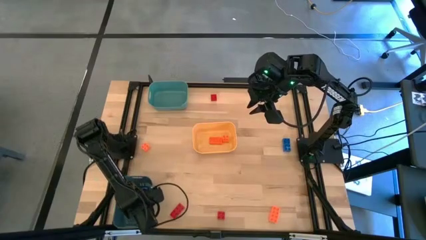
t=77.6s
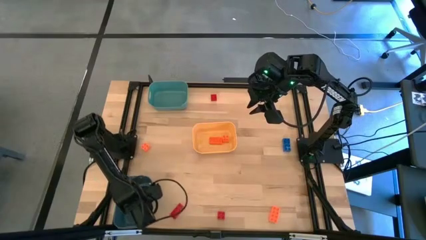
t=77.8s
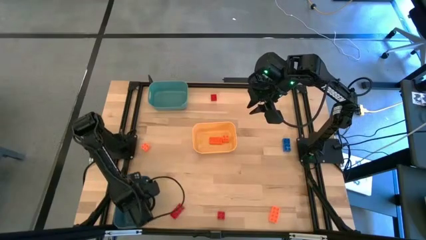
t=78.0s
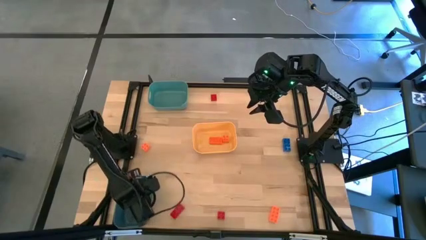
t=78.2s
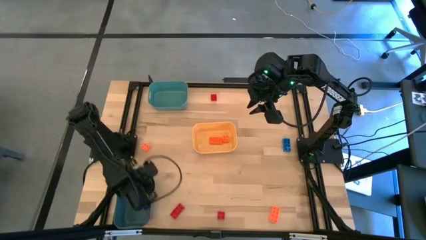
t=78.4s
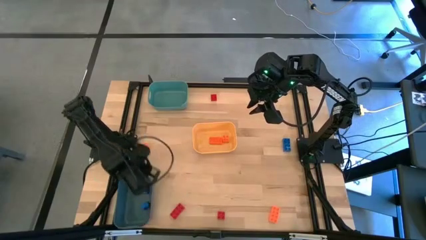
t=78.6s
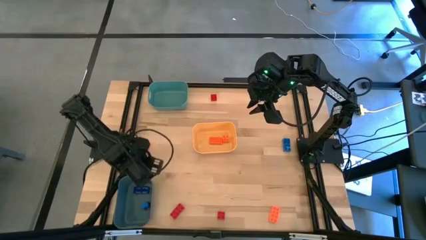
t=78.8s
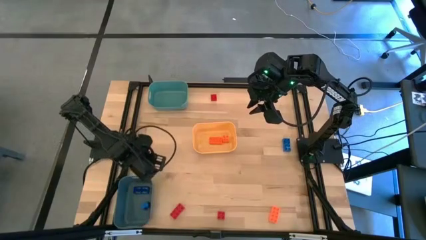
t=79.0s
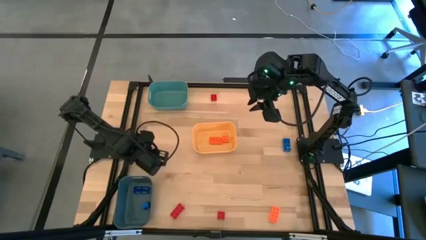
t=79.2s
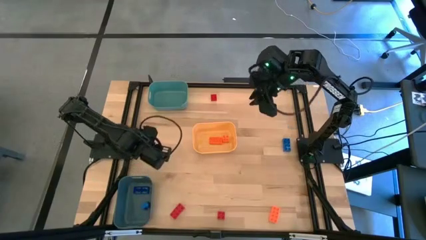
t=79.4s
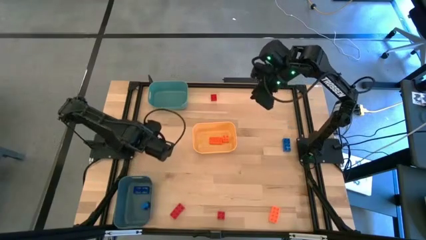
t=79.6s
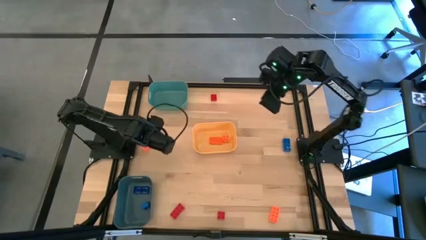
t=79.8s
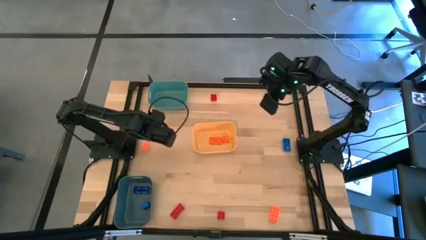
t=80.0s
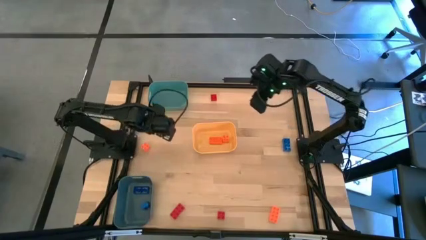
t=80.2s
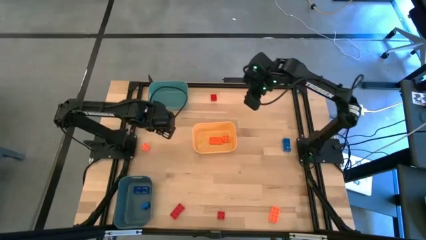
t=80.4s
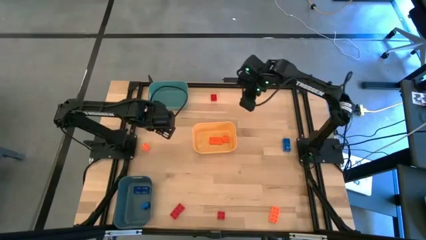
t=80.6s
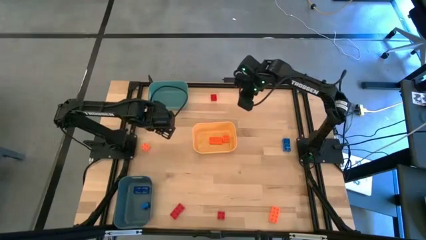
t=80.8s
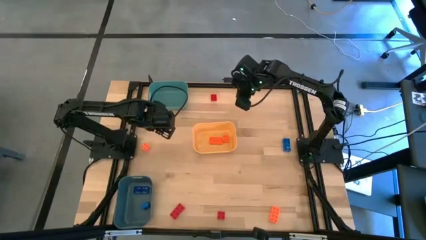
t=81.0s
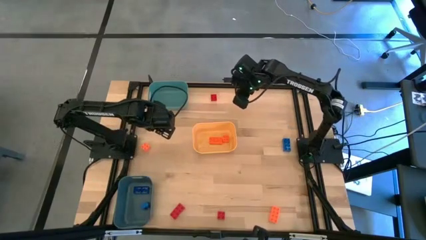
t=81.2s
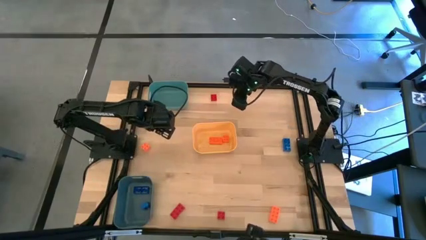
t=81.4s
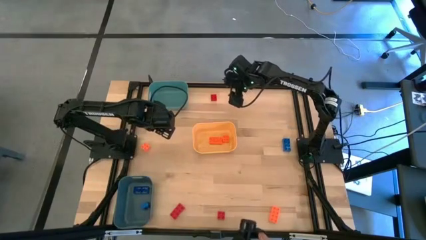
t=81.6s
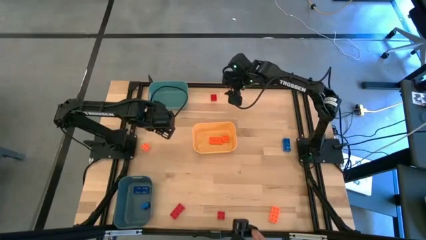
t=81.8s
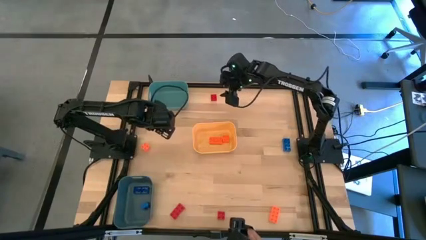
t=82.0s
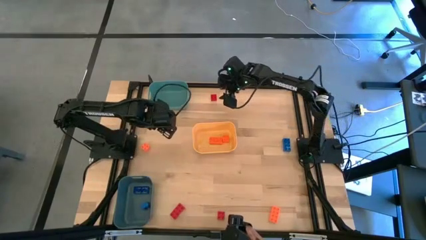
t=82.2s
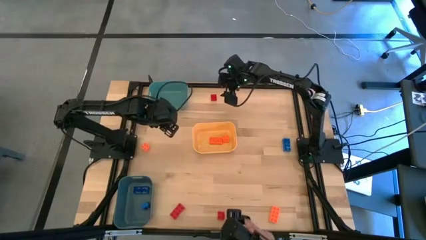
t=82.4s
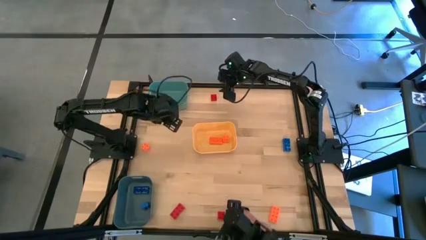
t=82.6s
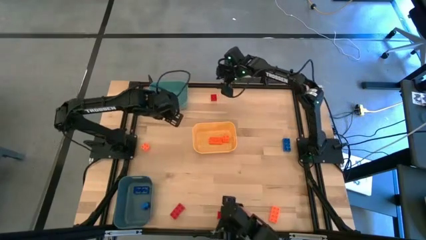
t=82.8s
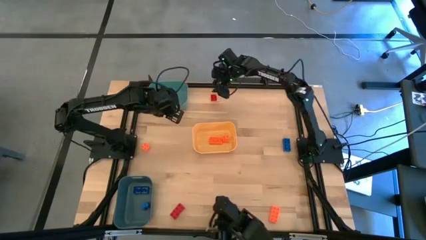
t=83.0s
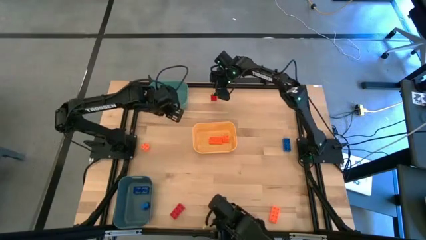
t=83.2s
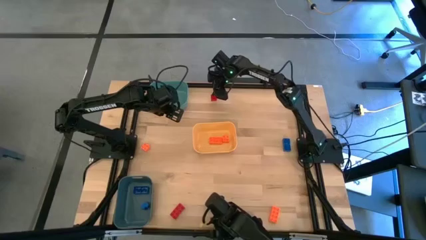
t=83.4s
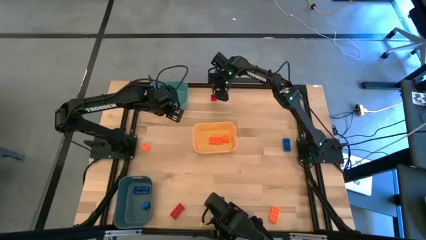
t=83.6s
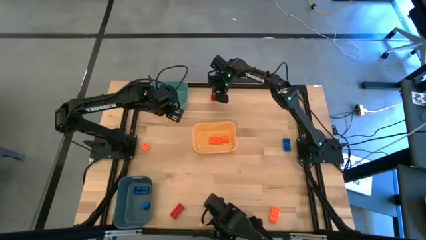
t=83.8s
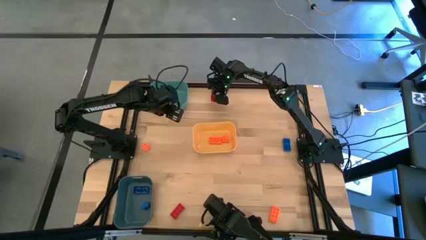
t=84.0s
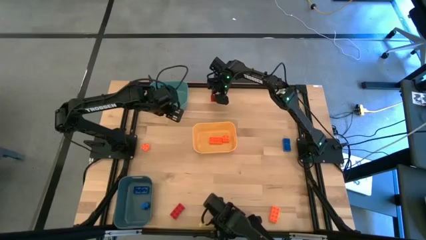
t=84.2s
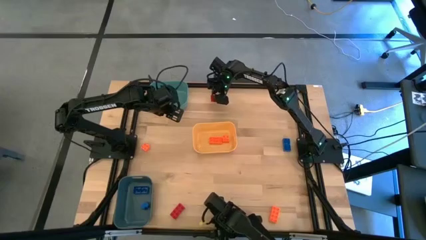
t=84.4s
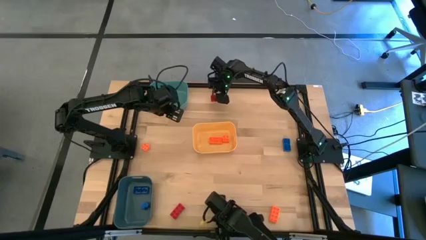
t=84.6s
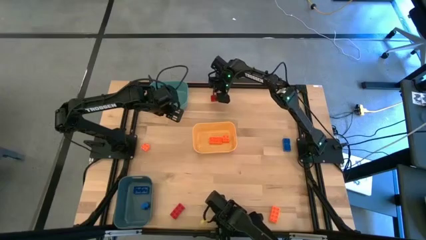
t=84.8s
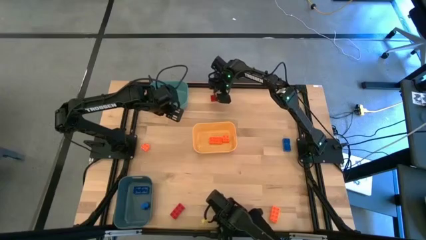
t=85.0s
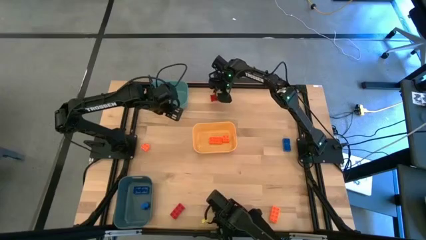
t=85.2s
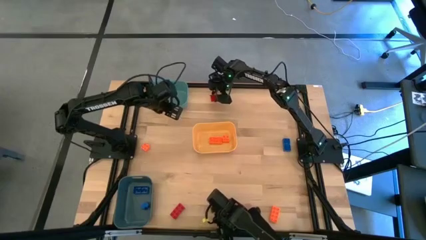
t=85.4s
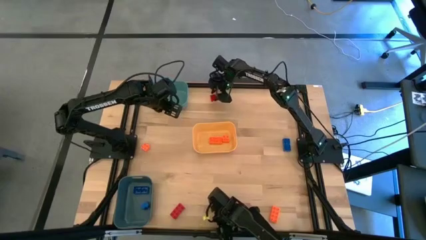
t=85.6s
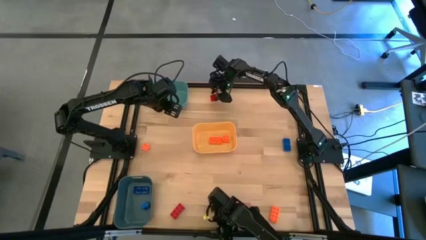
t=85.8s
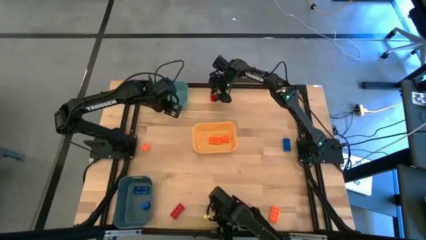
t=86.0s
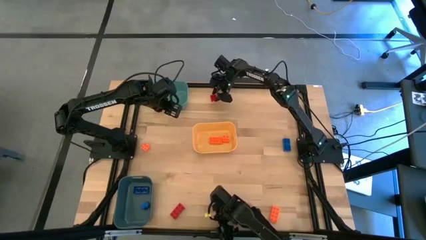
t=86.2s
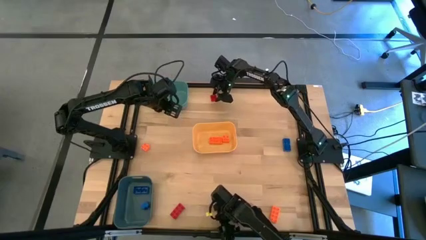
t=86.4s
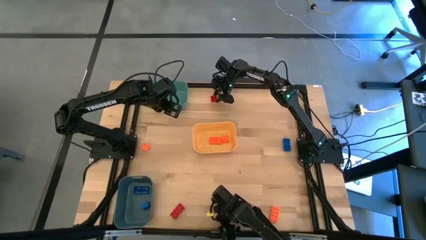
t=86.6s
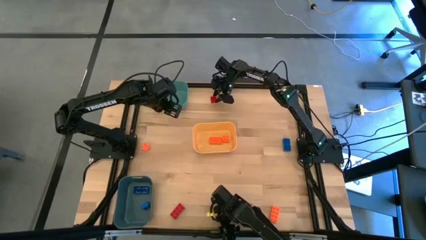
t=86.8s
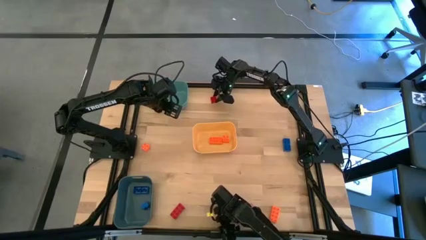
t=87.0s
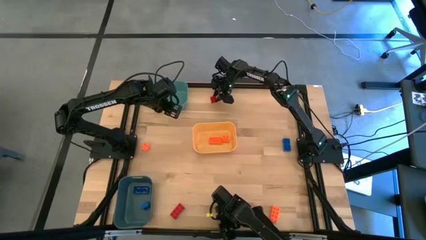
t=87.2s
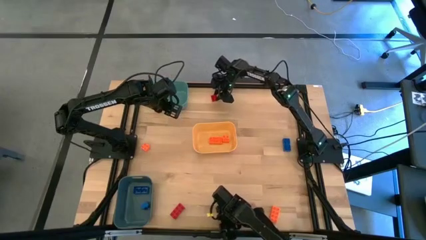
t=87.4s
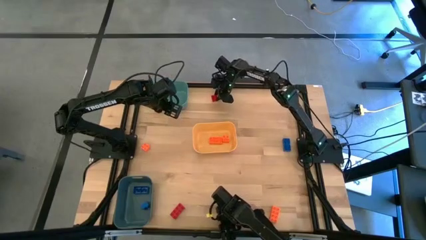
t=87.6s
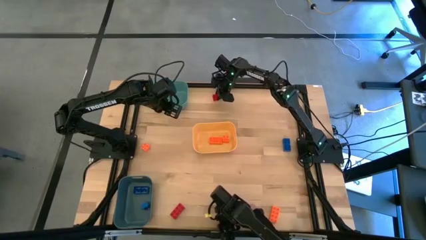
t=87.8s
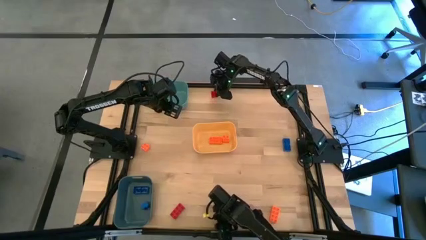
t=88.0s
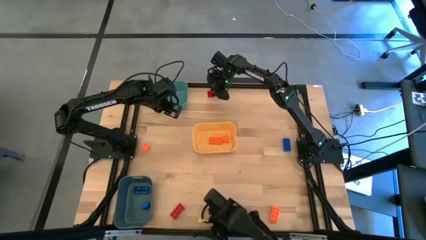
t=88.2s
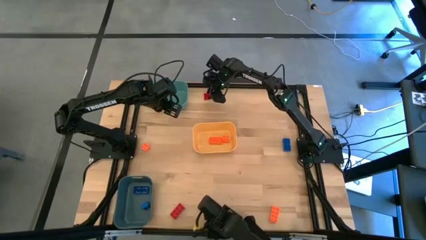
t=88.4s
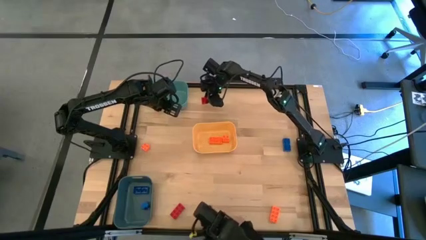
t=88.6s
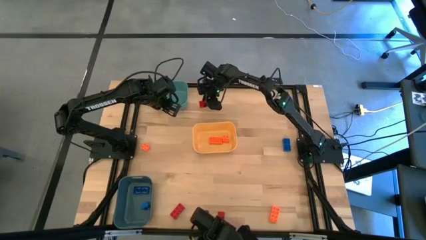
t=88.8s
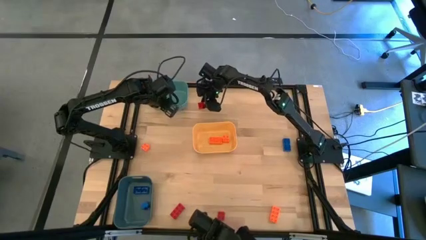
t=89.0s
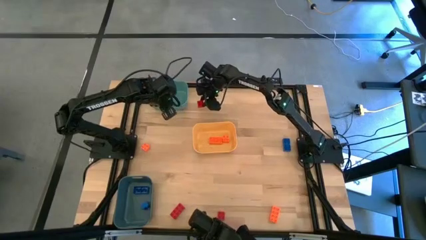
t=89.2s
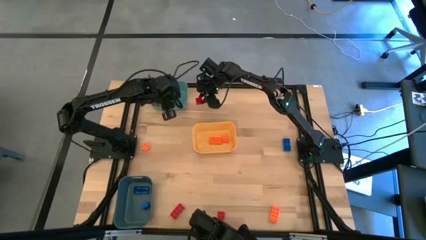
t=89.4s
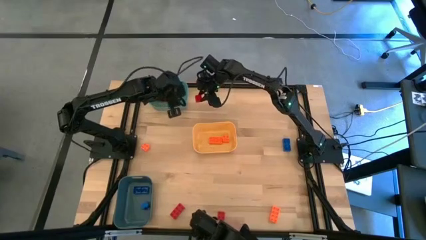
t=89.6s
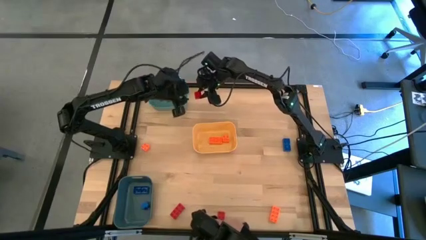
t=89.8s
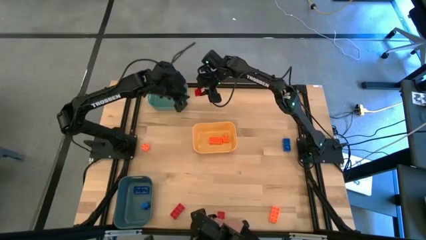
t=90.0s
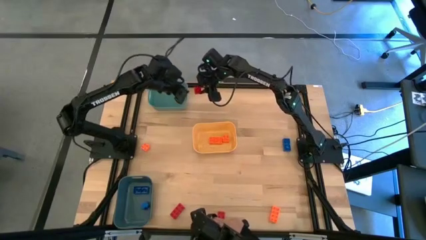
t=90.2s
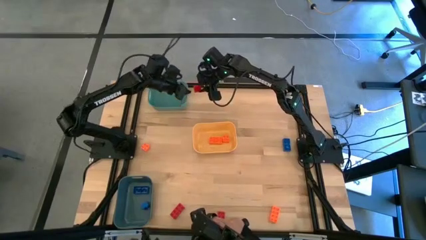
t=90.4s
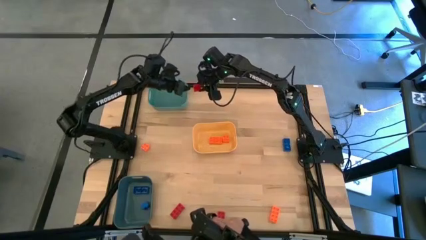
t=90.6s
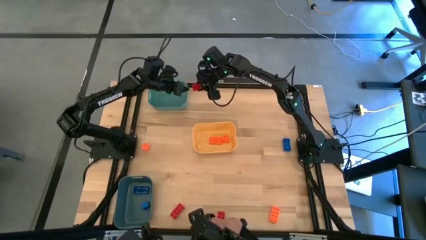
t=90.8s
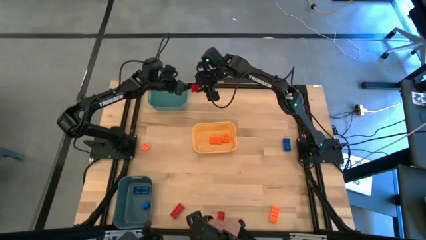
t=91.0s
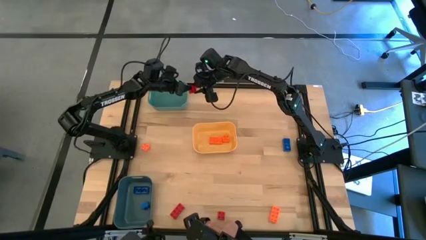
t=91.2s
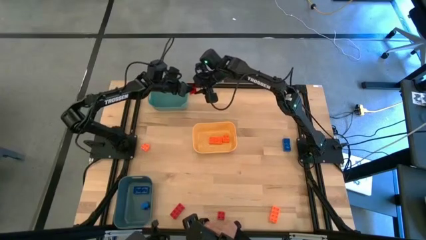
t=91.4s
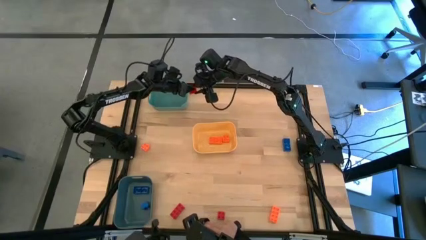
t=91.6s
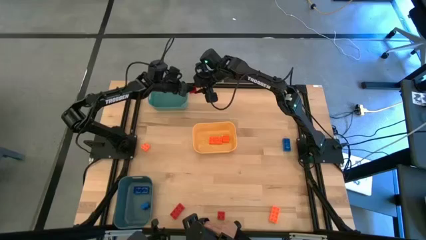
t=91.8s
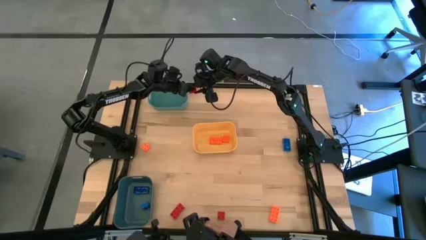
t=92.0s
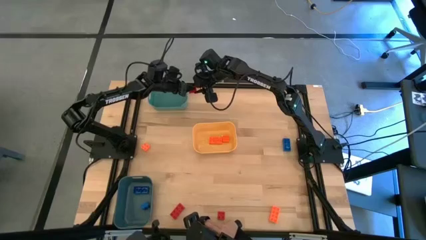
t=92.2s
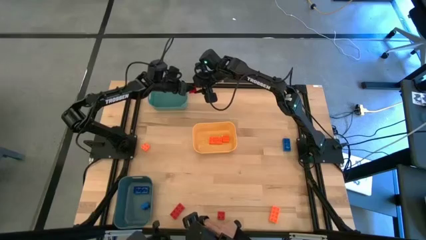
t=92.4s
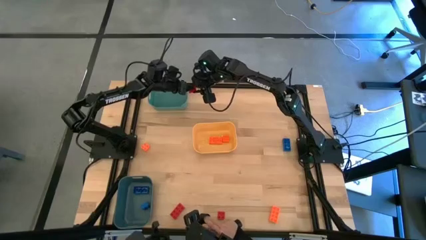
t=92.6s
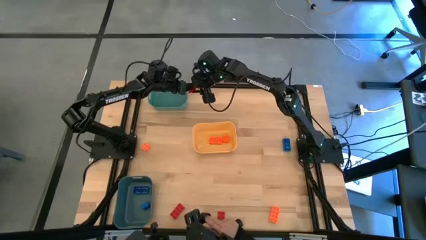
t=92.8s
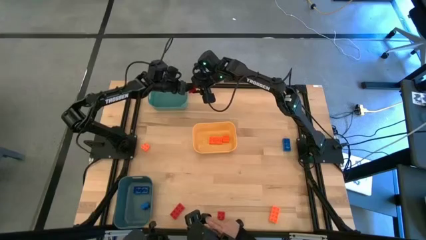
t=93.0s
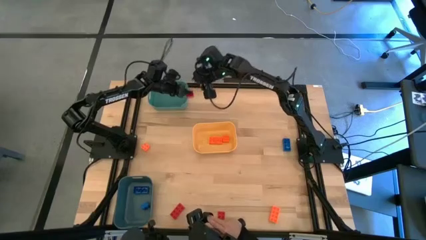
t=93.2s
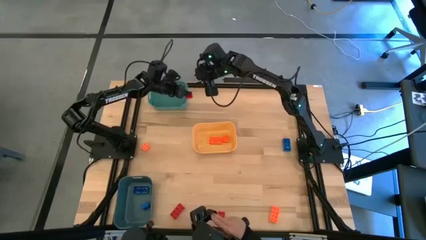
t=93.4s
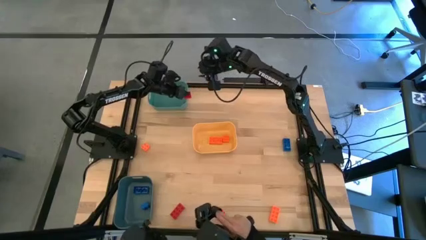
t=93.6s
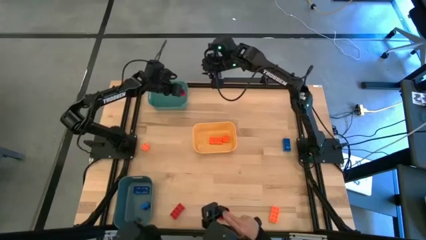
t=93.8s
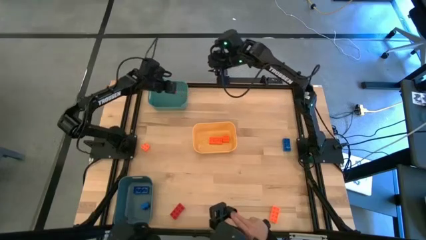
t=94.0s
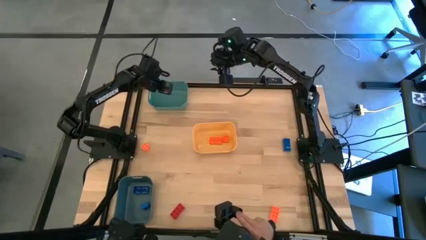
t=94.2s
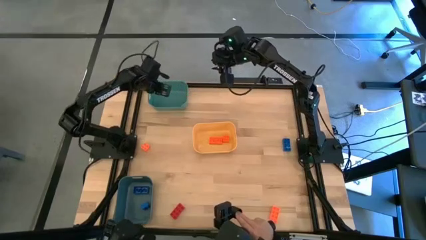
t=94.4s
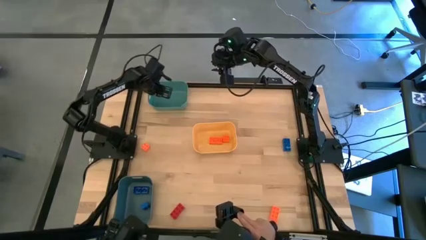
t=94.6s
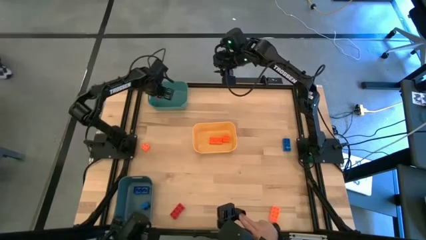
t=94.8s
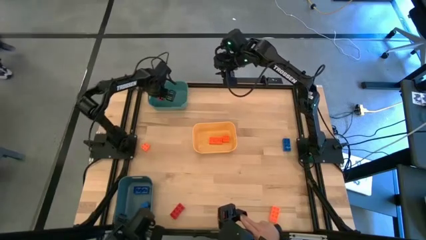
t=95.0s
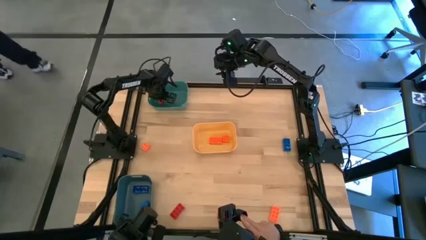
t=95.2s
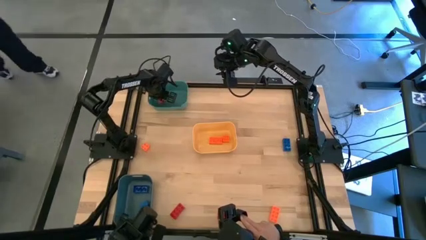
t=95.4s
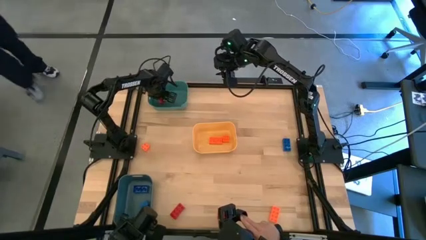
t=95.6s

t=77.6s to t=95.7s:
Task: Sort & place blocks by color
Put the top red 4 stud game piece into the green bin
